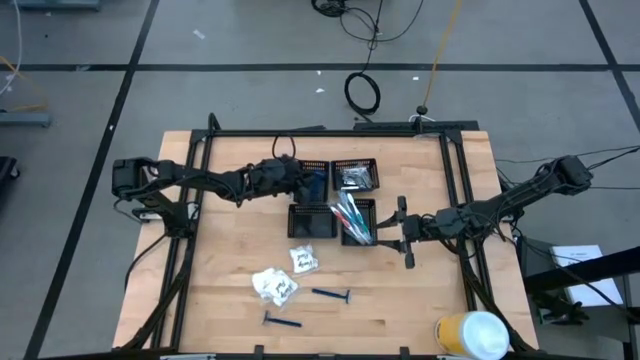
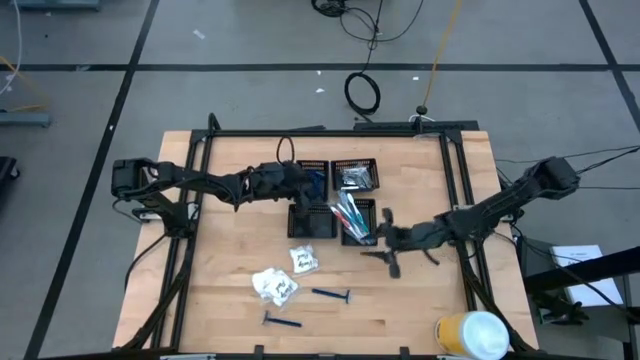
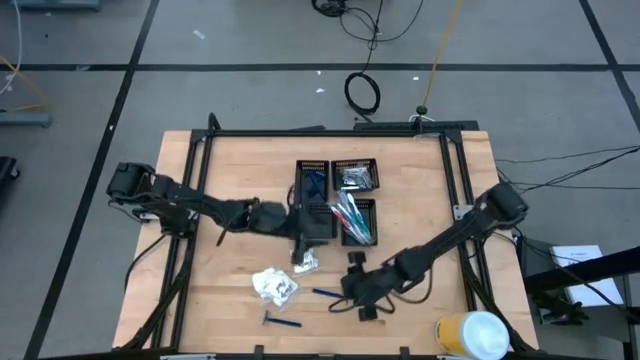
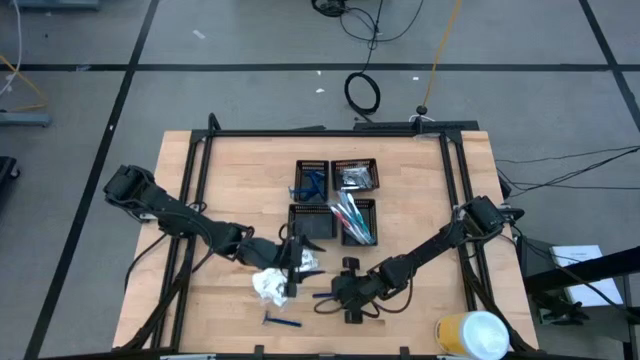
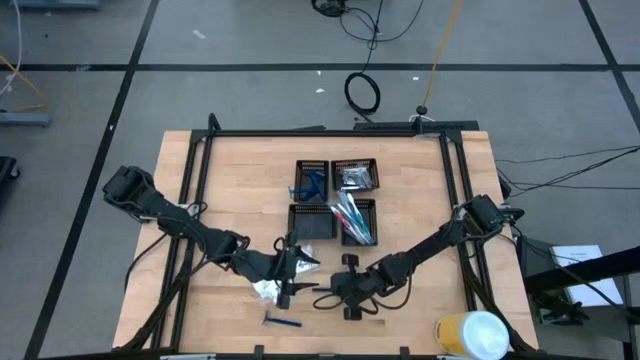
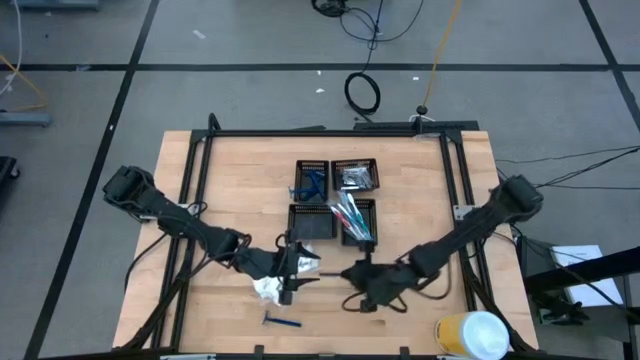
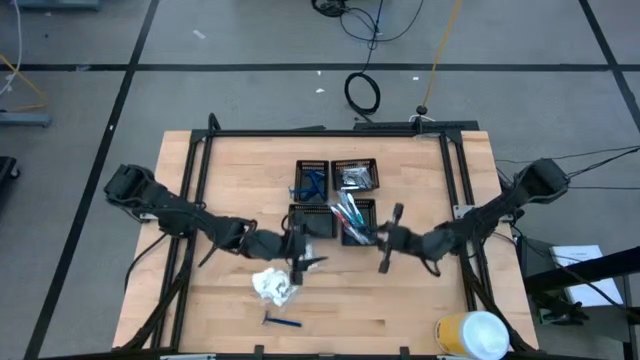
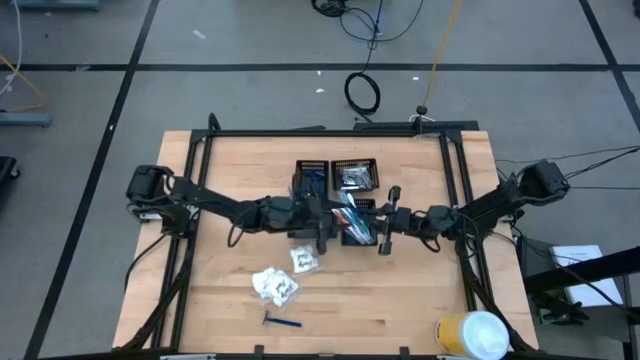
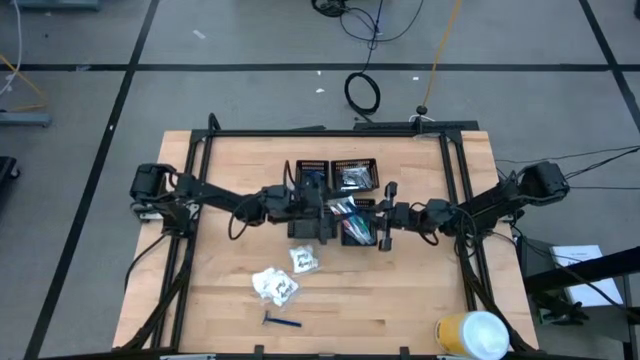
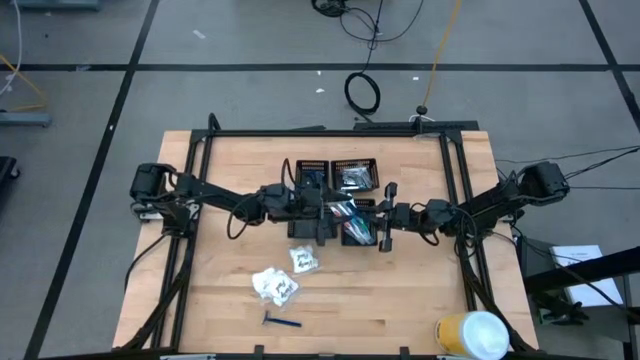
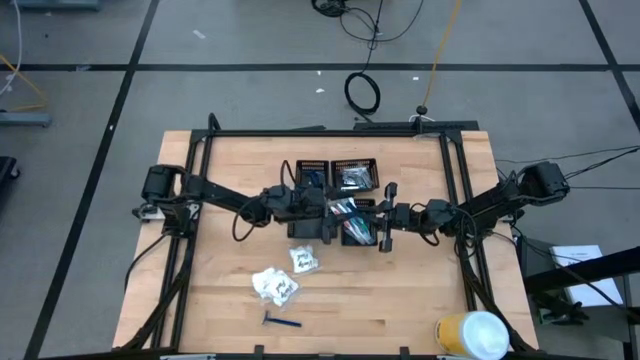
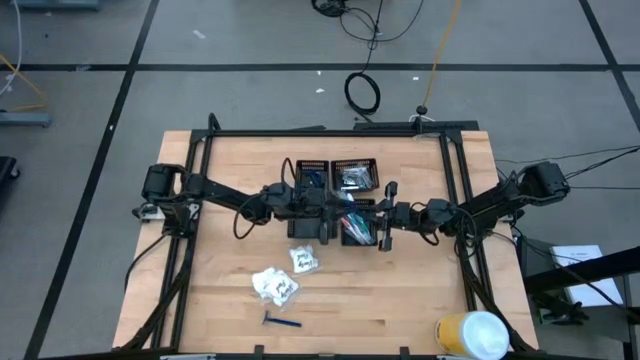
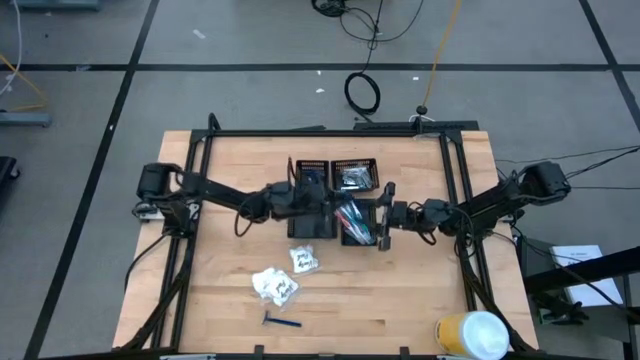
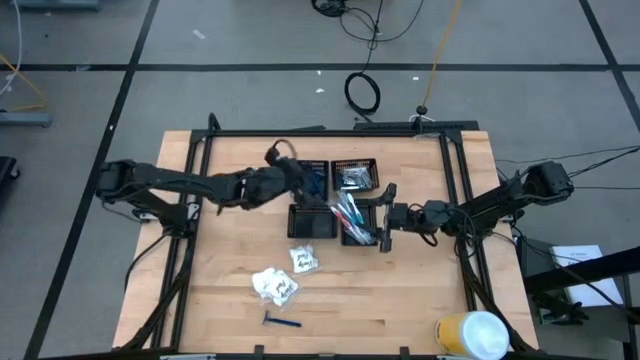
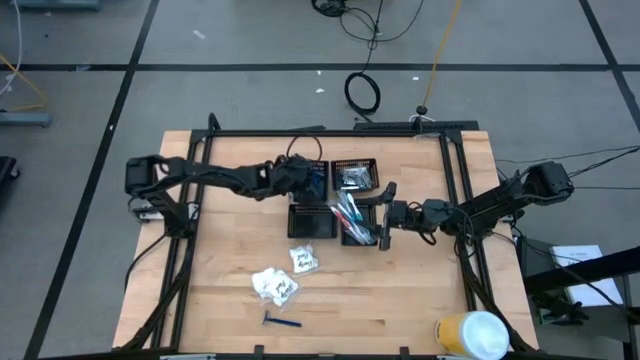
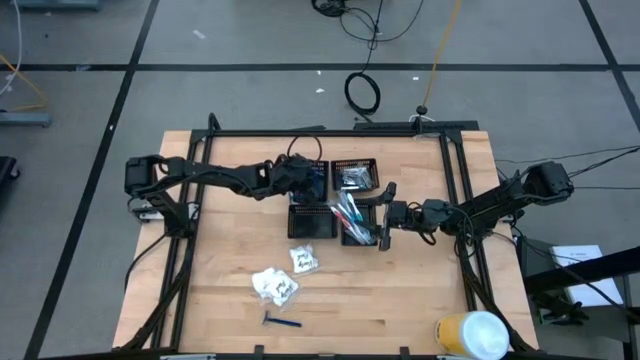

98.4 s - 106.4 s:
Task: Pick & Place Travel size toiletries
Put the blue razor into the top left black bin

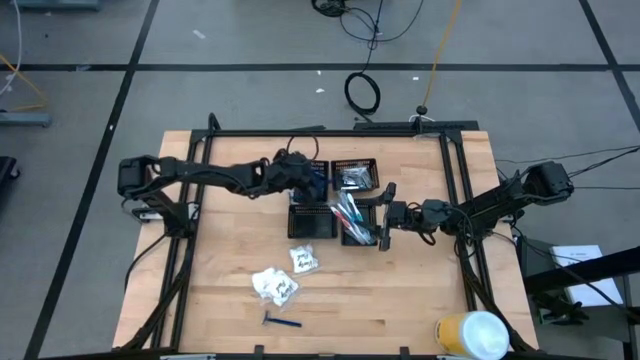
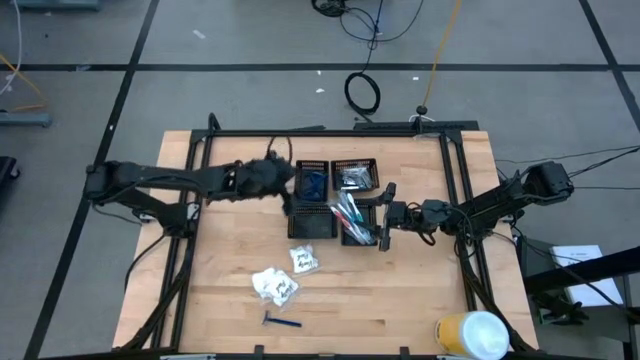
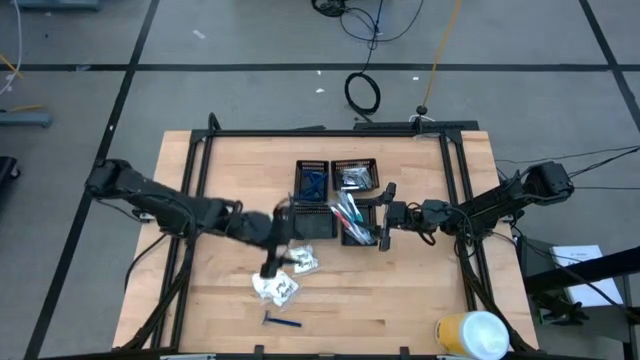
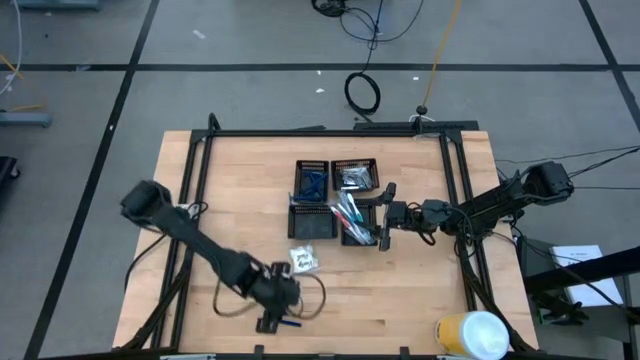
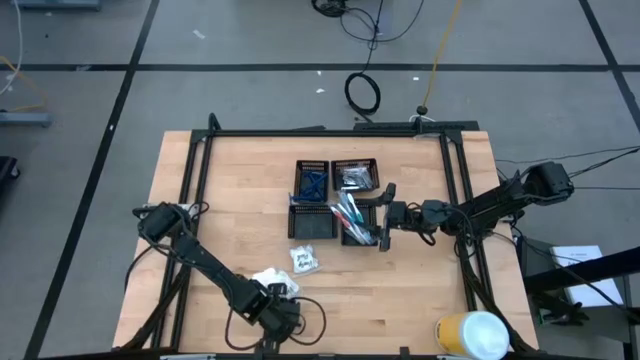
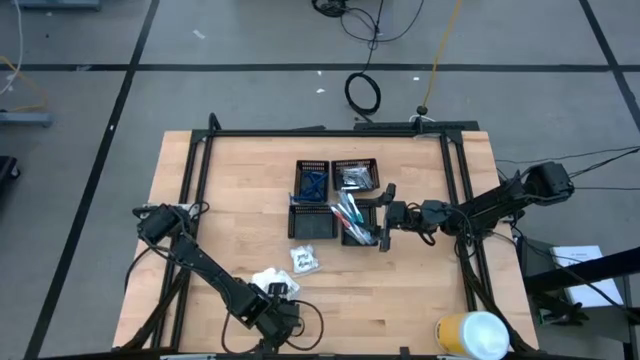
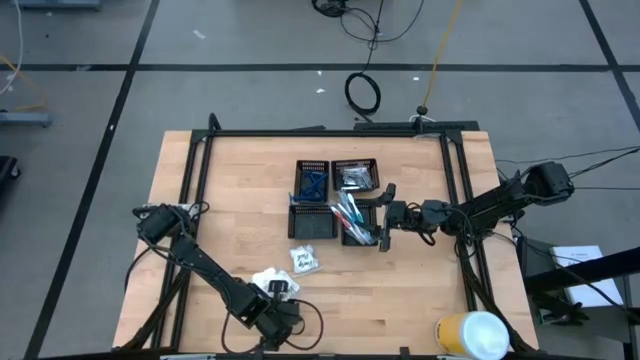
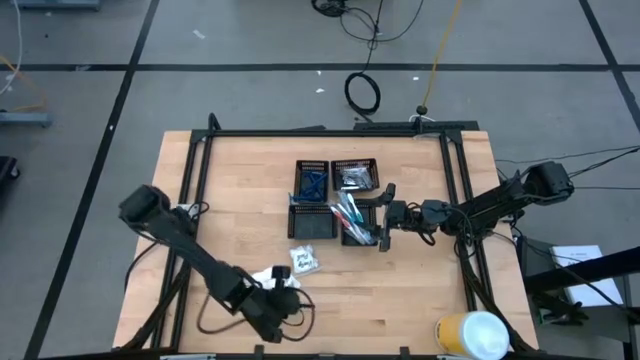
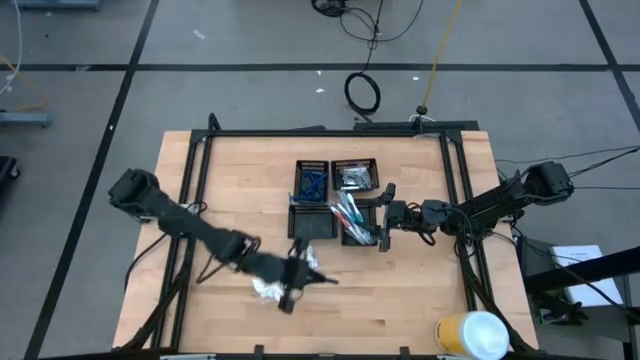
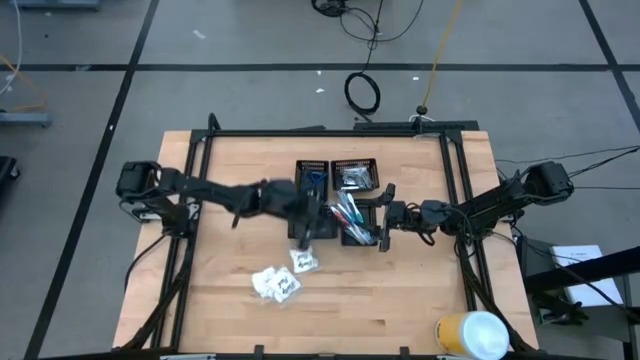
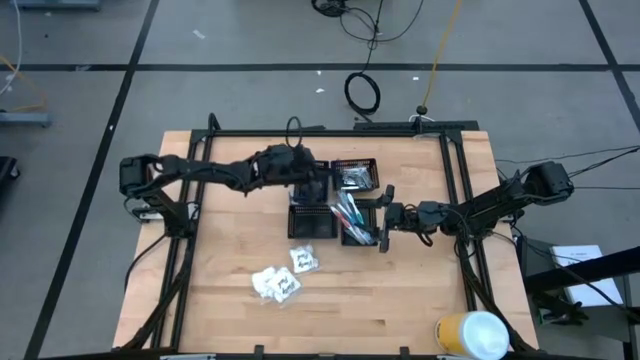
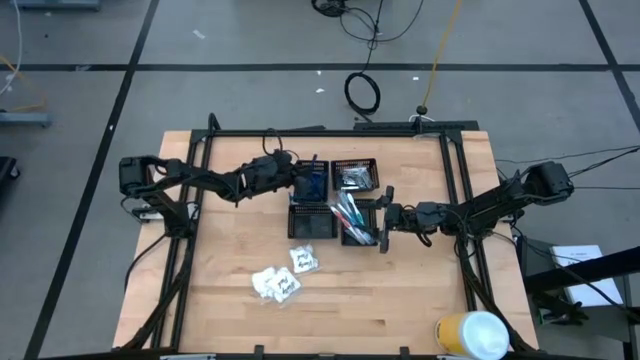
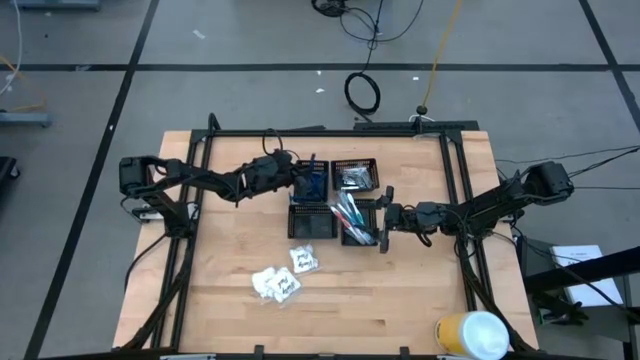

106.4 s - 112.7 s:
Put the blue razor into the top left black bin

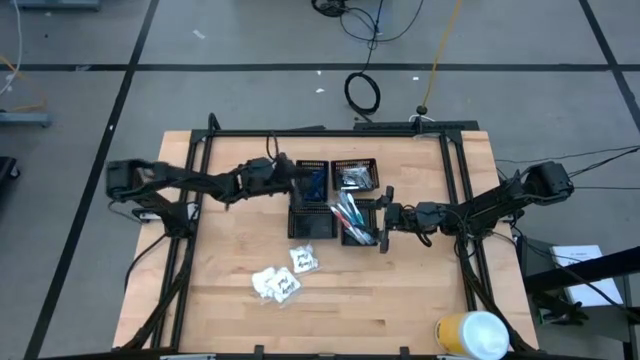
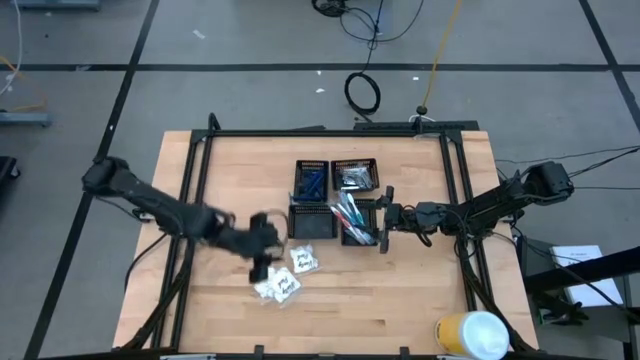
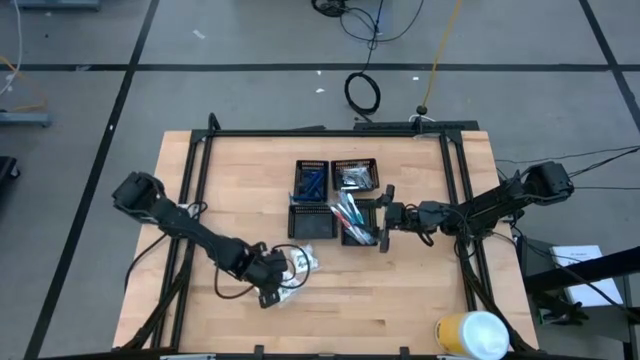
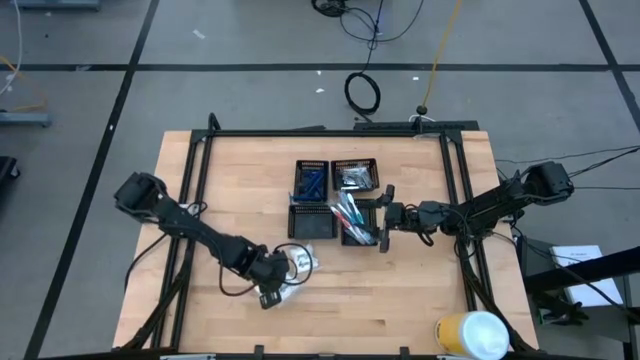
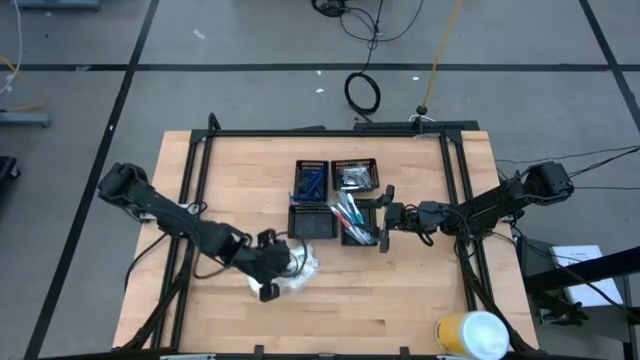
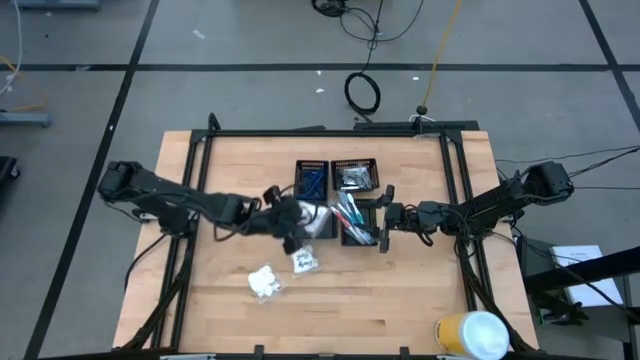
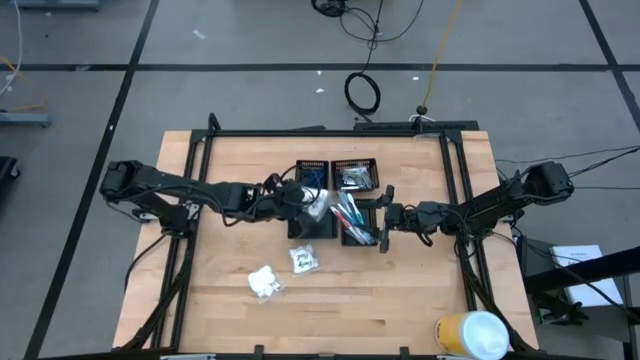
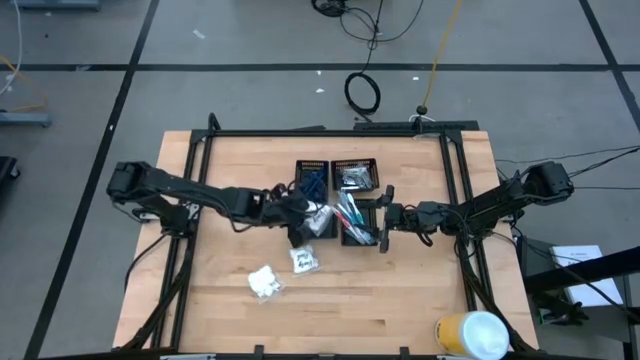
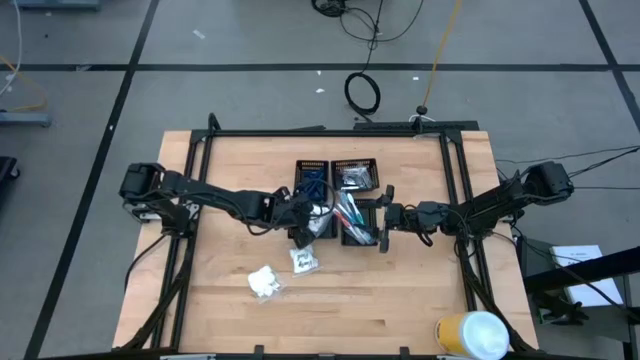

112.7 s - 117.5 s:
Put the white cotton pack into the bottom left black bin

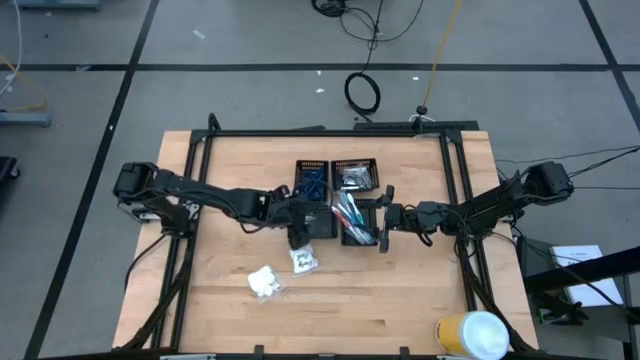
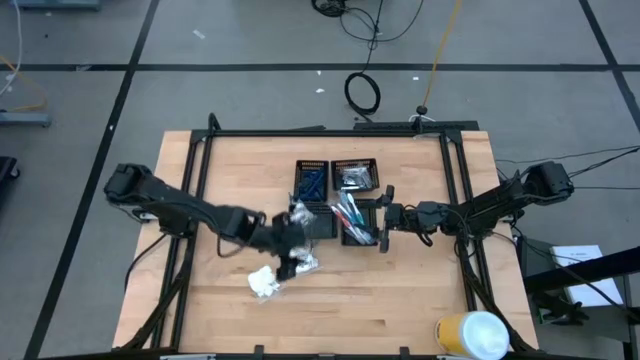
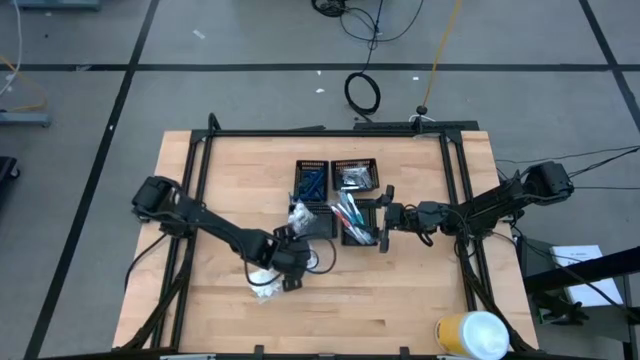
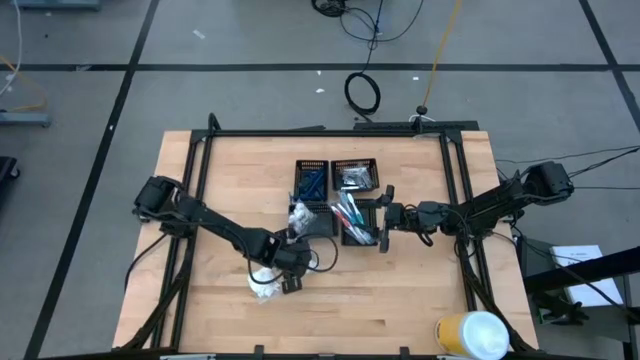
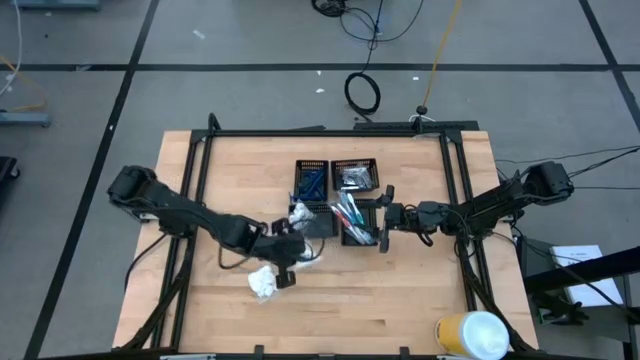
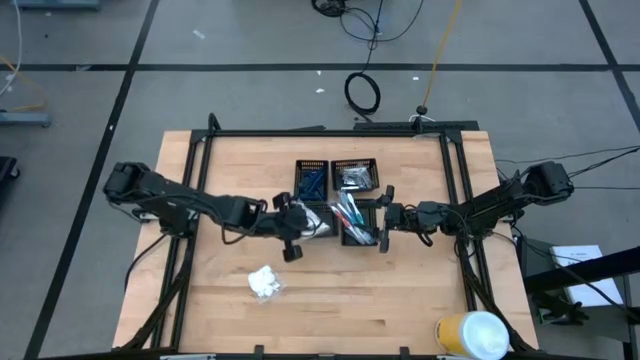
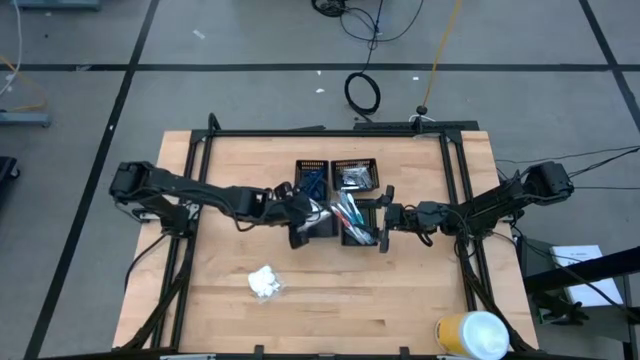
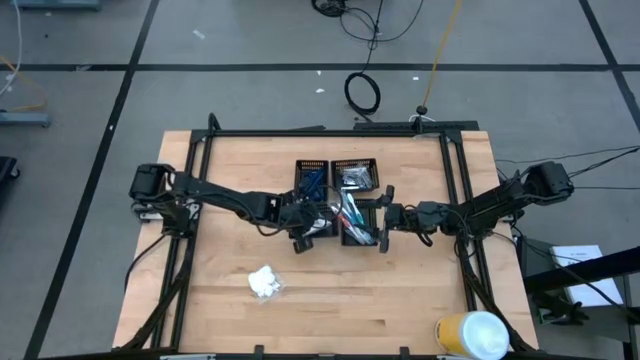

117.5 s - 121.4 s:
Put the white cotton pack into the bottom left black bin
